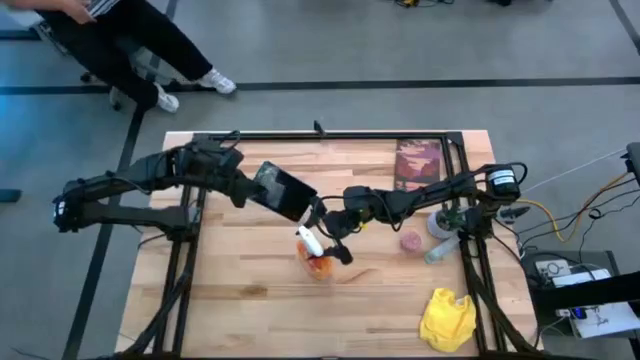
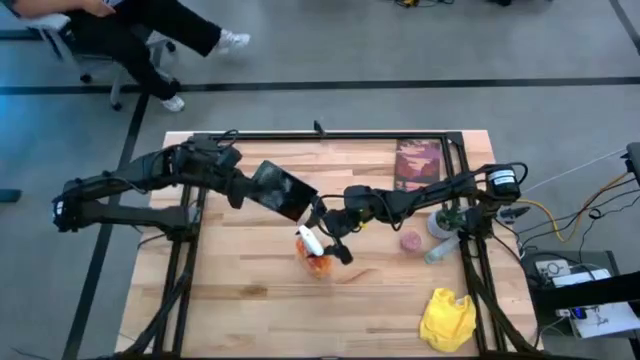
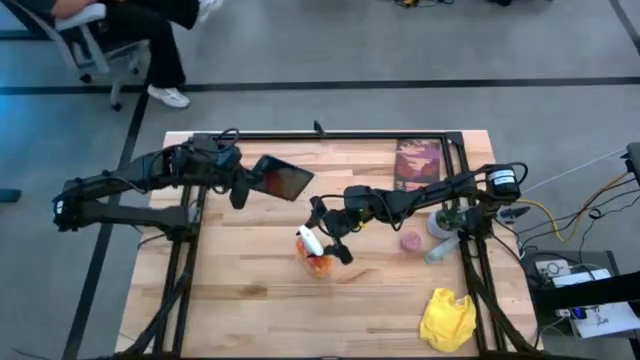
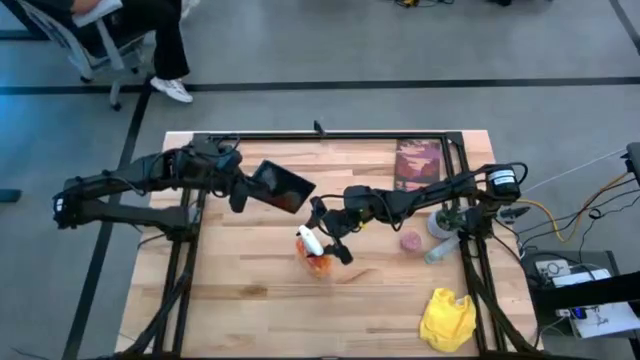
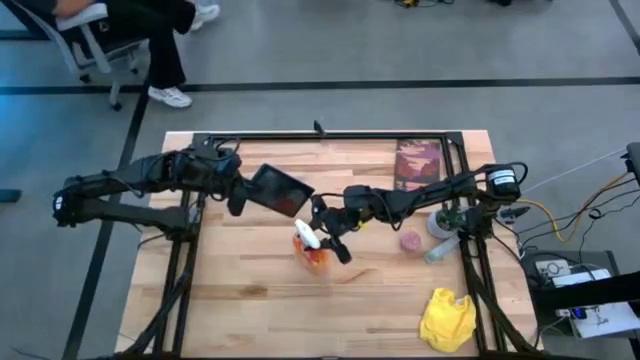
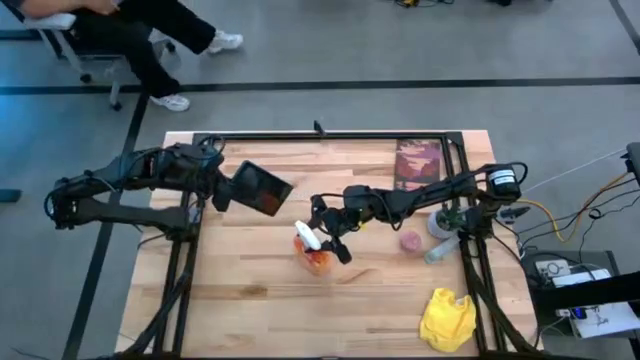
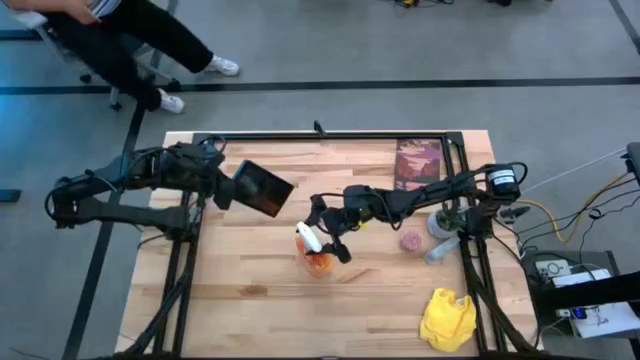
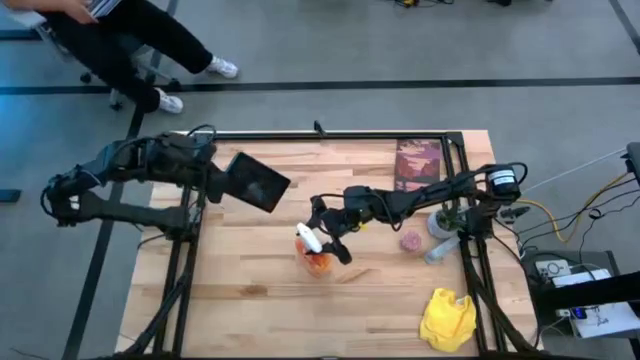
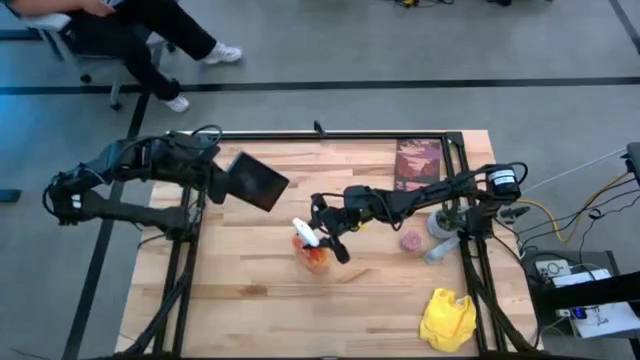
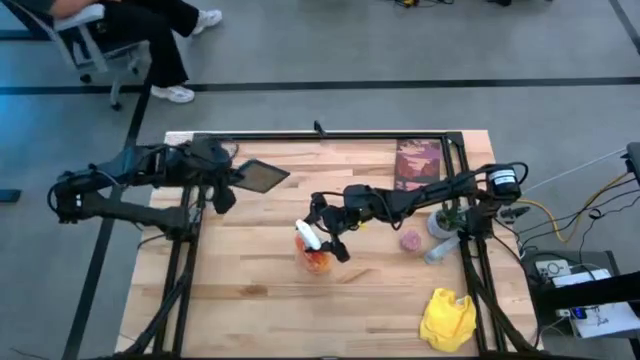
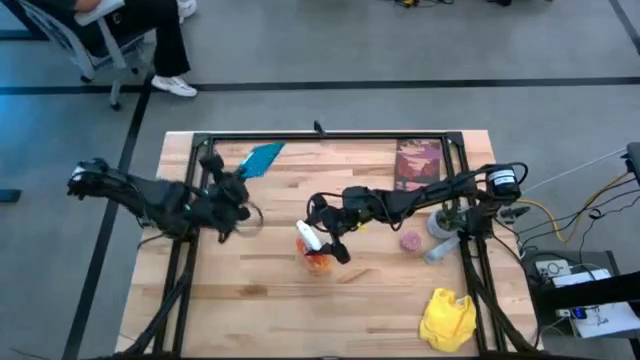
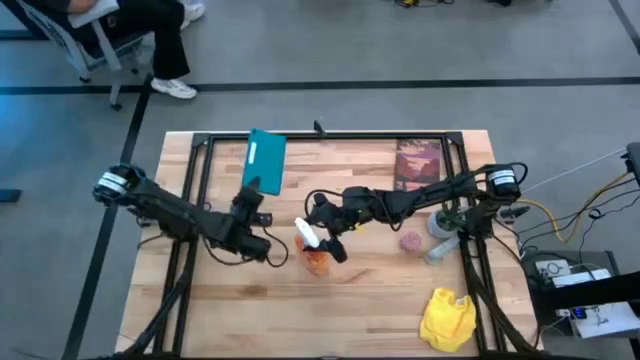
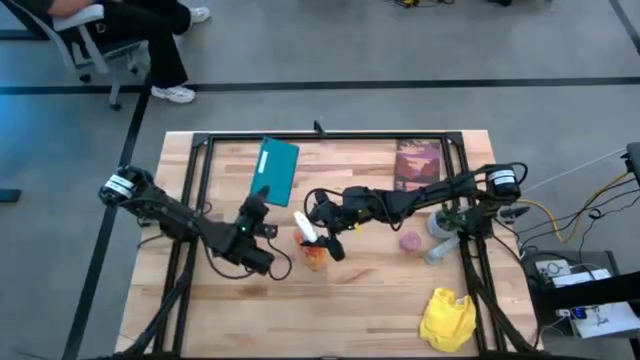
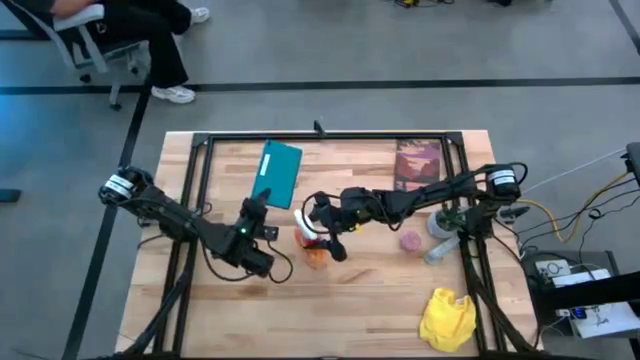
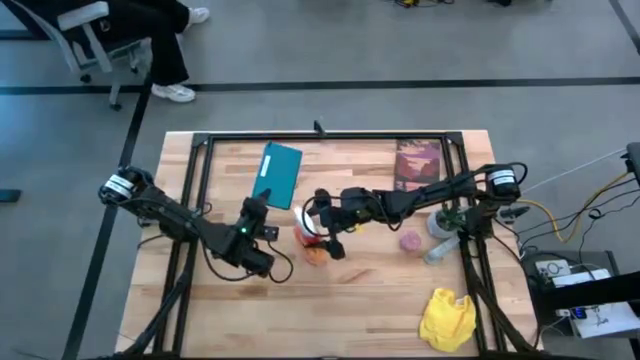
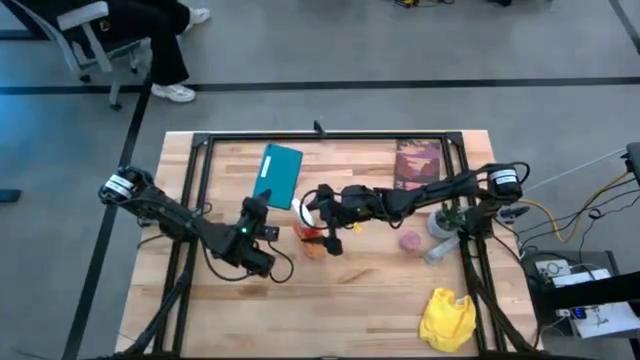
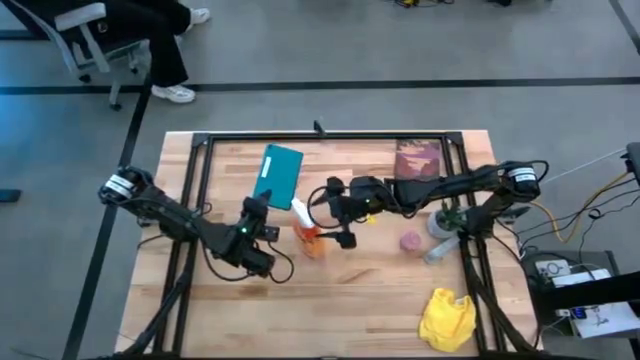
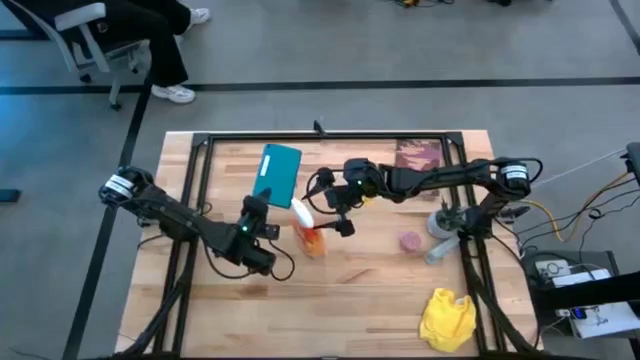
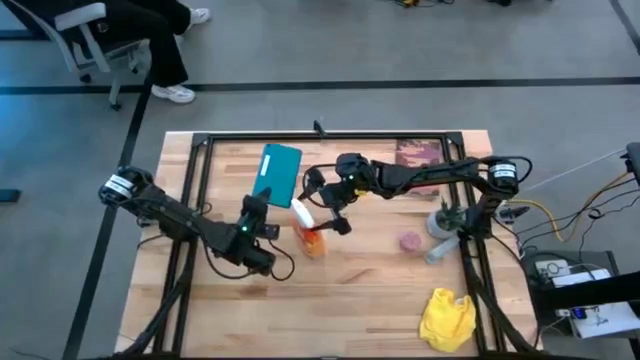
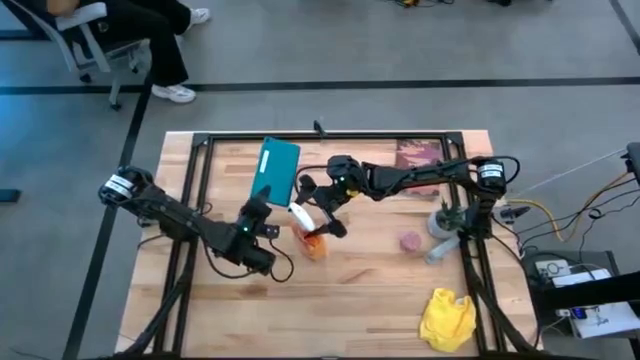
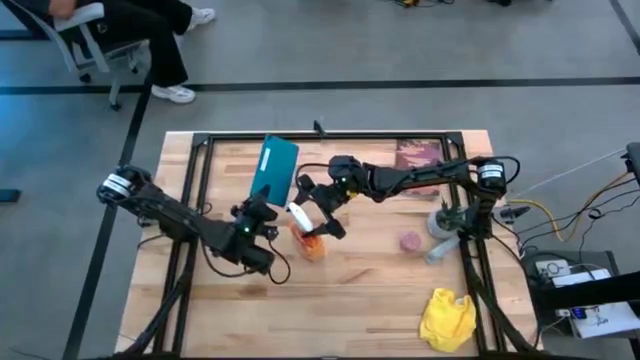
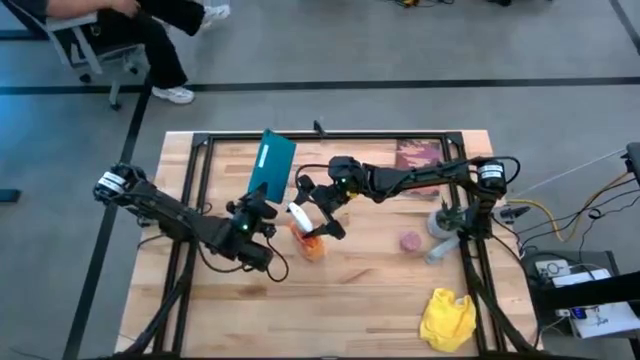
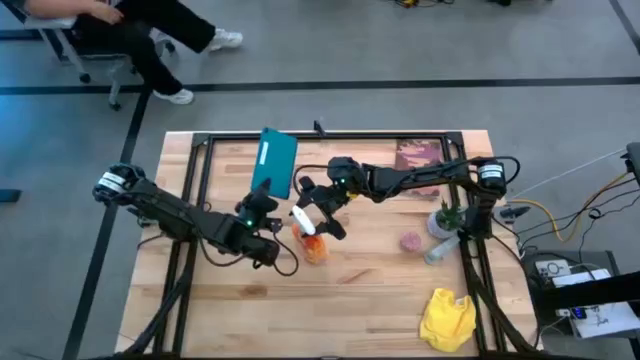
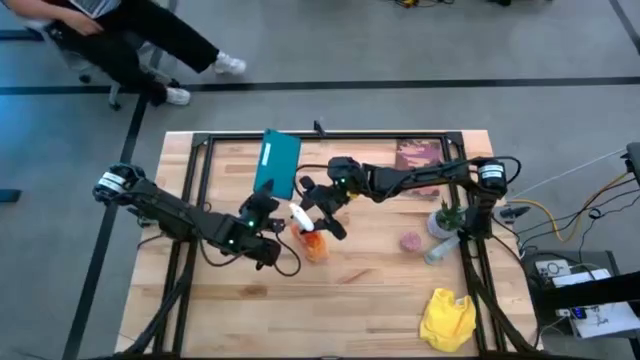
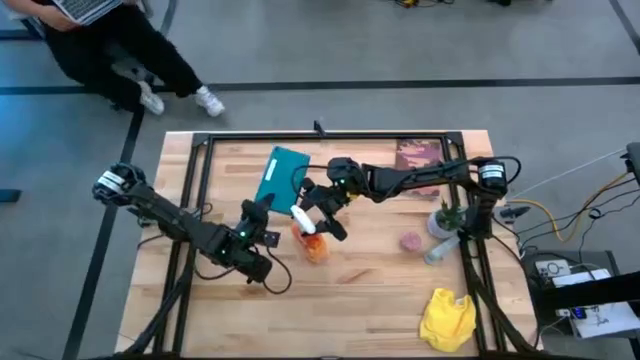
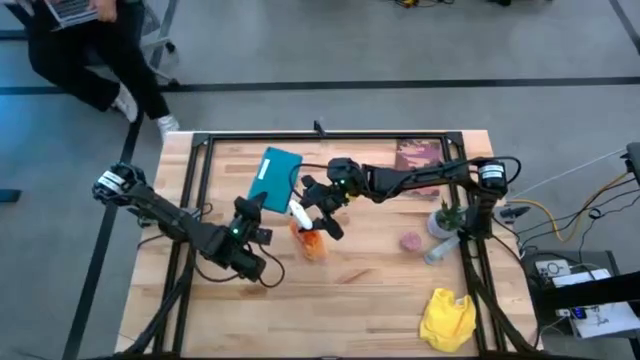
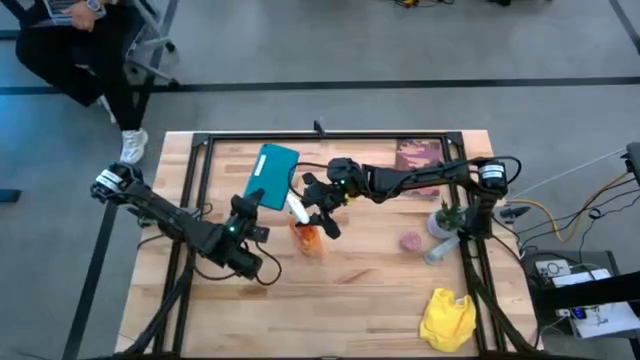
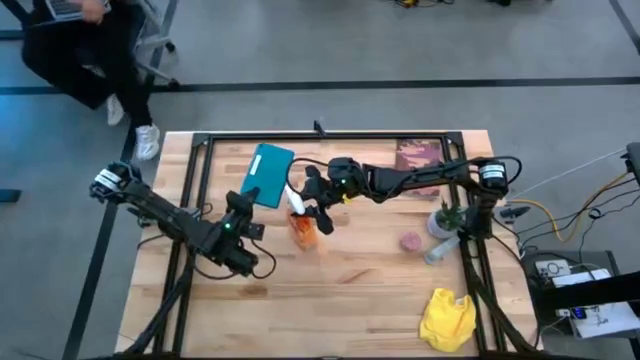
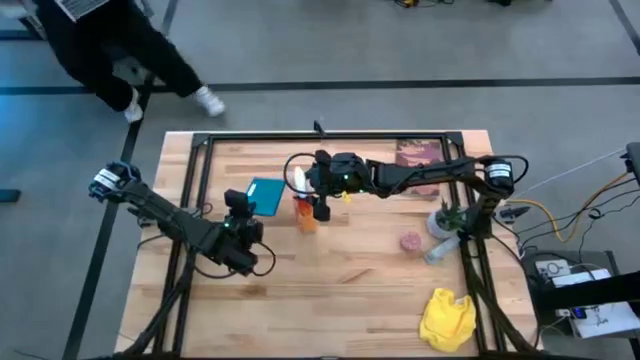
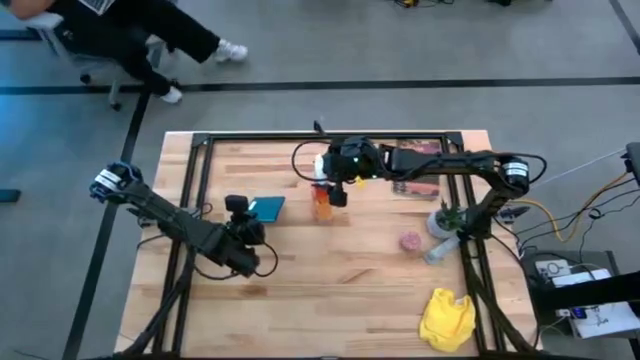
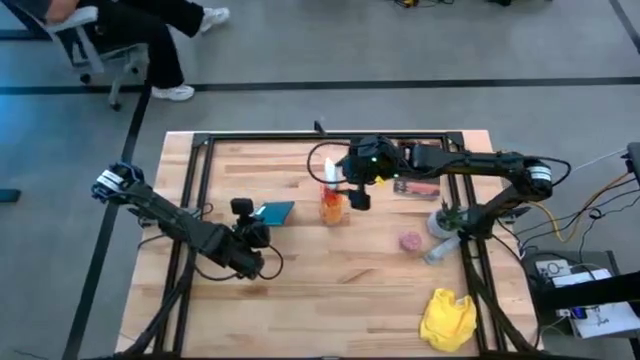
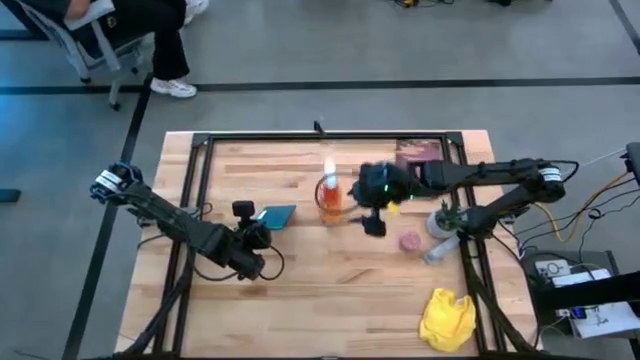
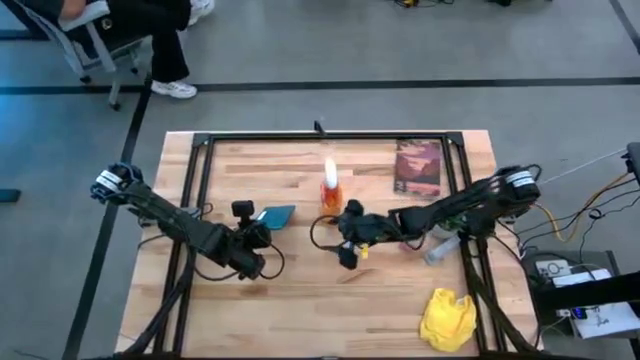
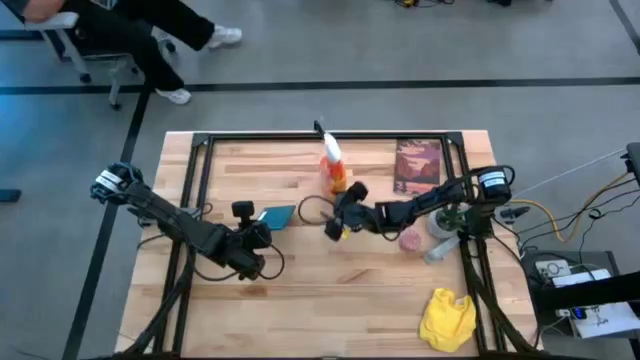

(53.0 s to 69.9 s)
Task: Apply microfiber cloth
Spray the front and back of the tablet with the spray cleaning bottle

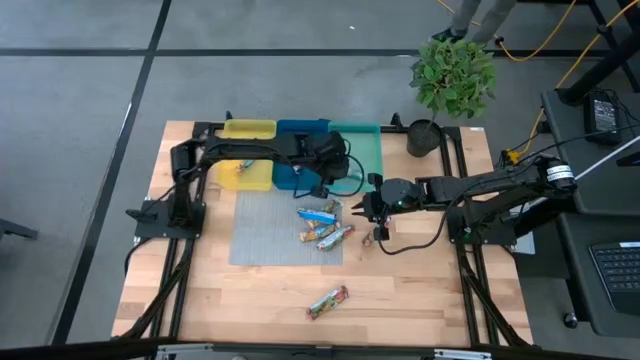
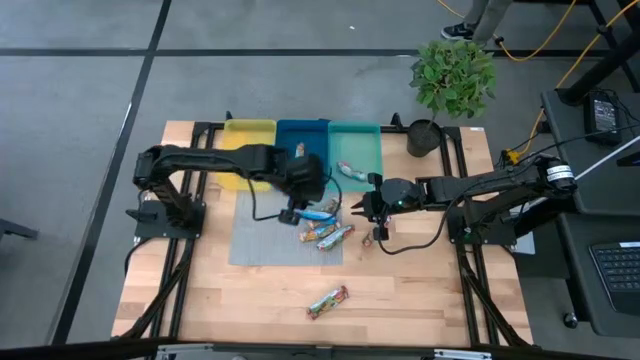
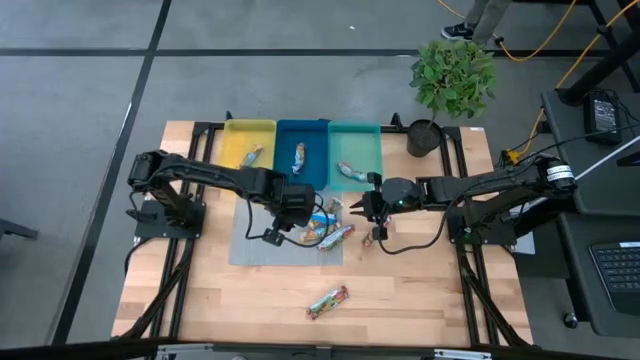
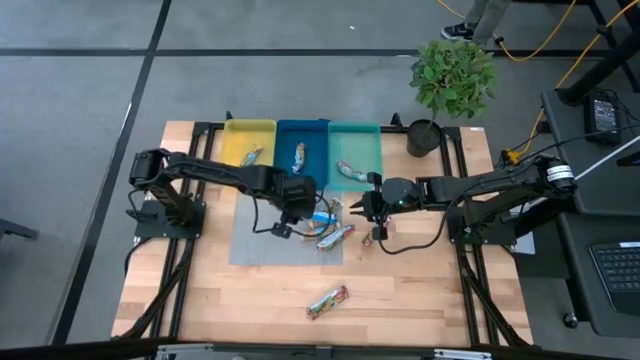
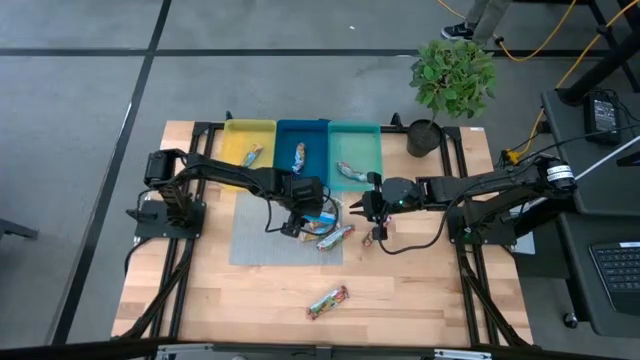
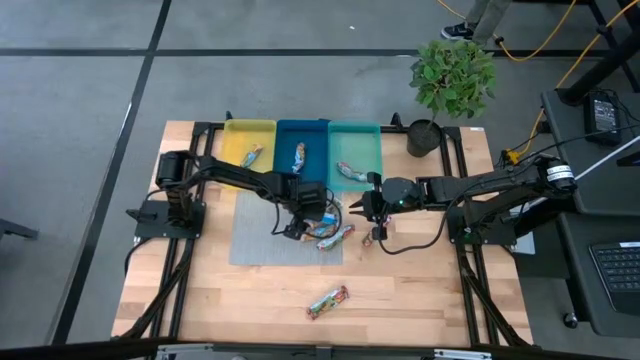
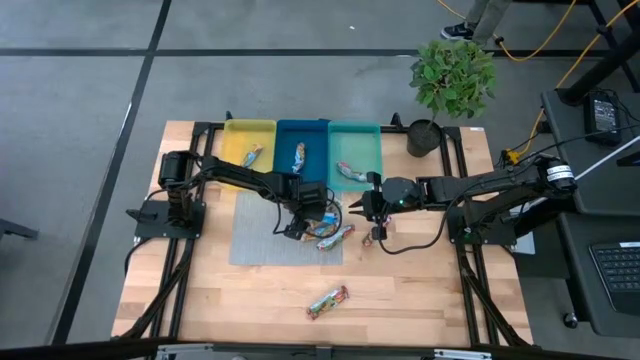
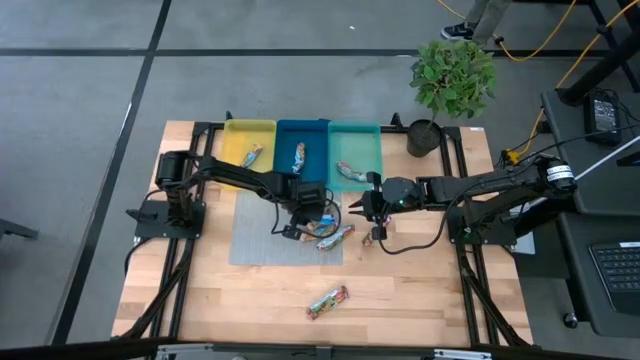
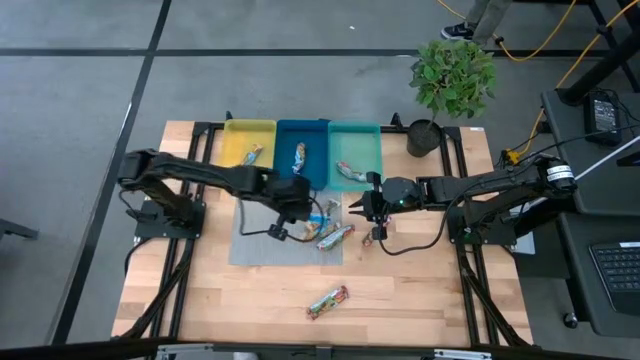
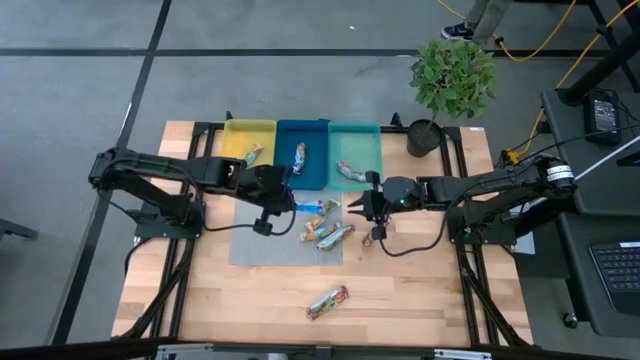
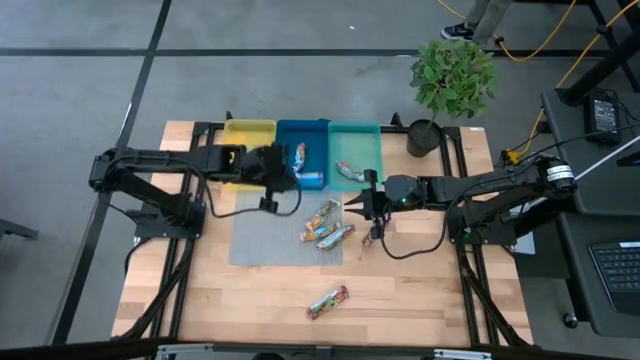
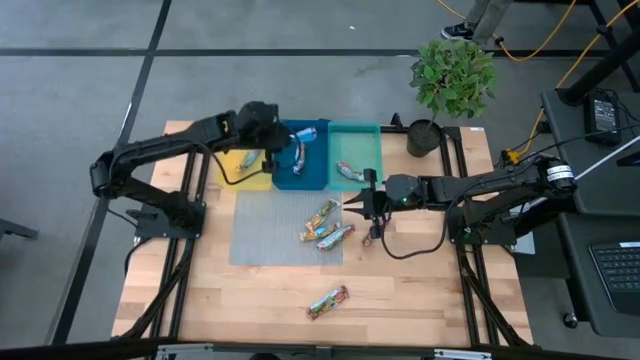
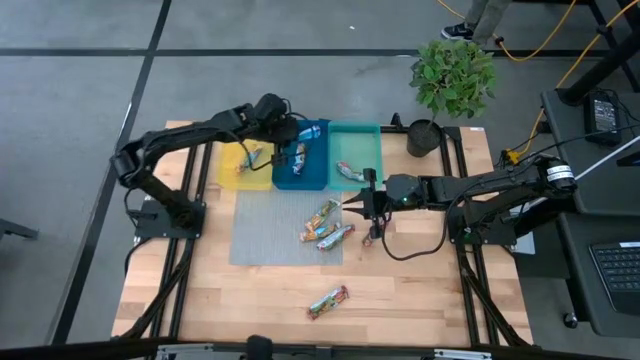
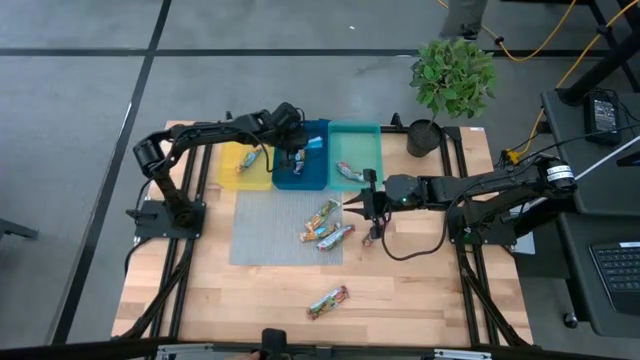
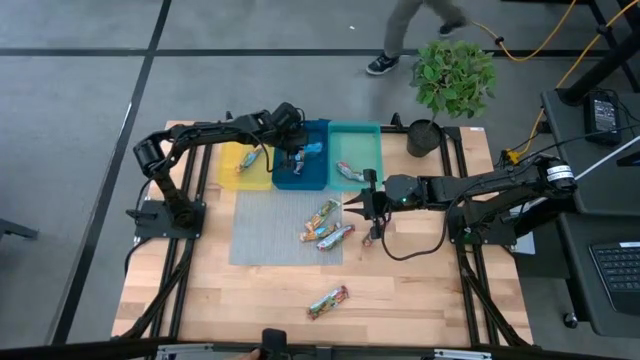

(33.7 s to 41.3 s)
Task: Pick and place Granola Bars by type
Put the blue granola bar into the blue bin
